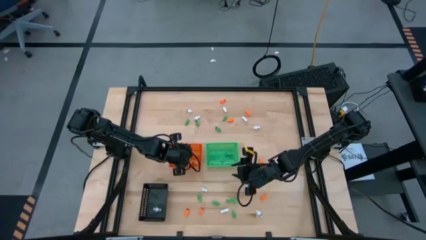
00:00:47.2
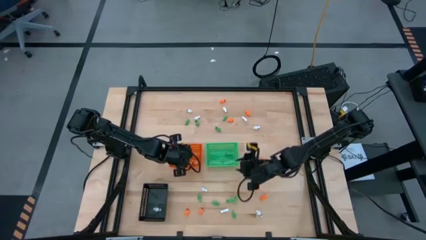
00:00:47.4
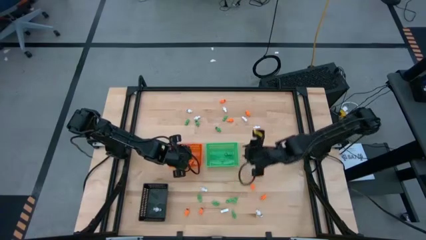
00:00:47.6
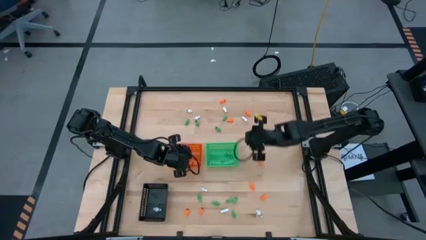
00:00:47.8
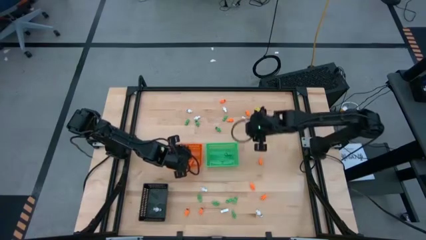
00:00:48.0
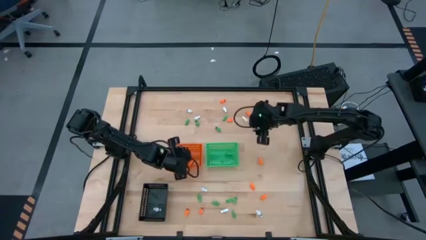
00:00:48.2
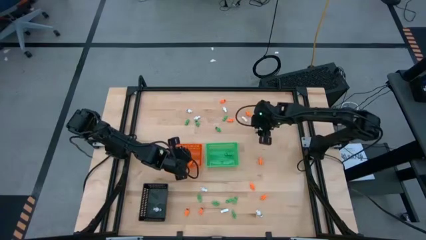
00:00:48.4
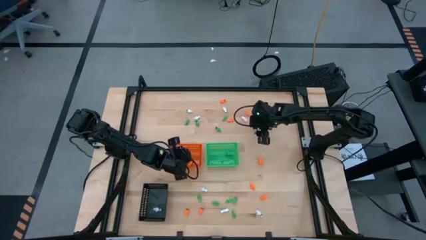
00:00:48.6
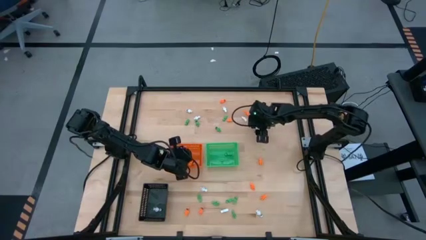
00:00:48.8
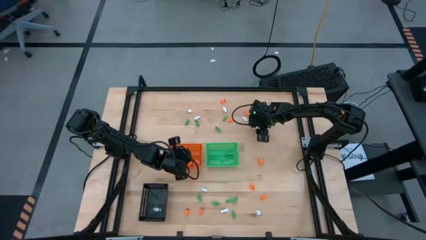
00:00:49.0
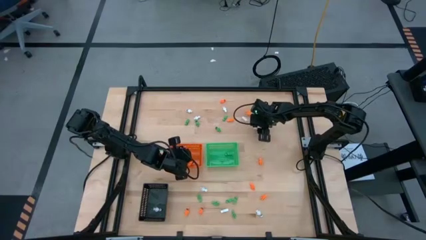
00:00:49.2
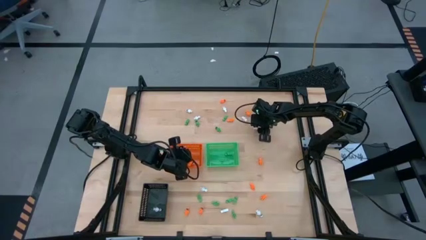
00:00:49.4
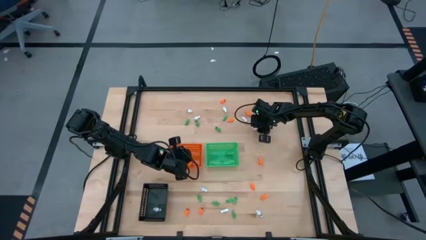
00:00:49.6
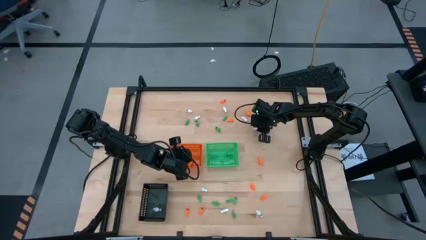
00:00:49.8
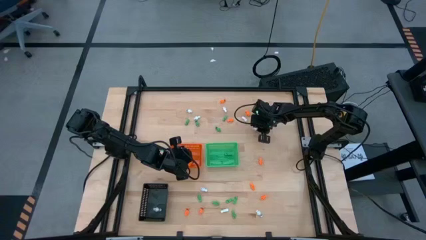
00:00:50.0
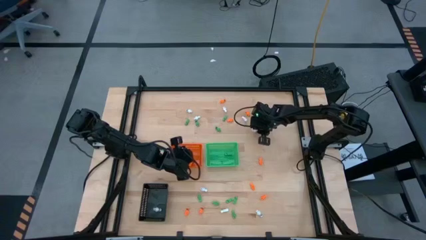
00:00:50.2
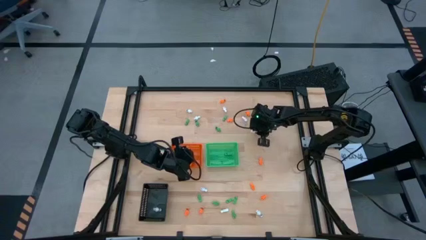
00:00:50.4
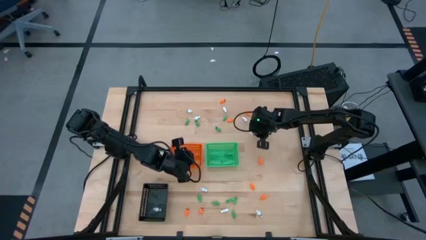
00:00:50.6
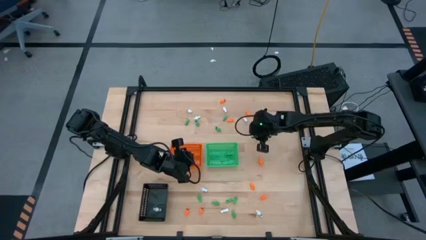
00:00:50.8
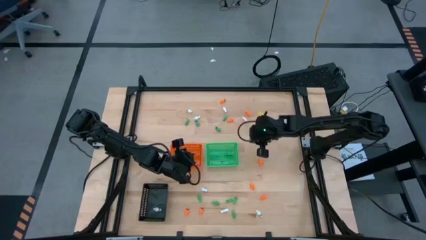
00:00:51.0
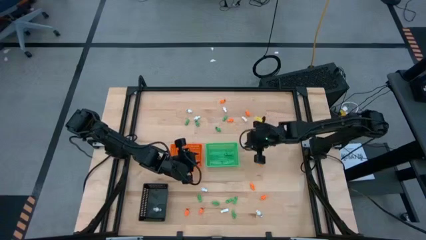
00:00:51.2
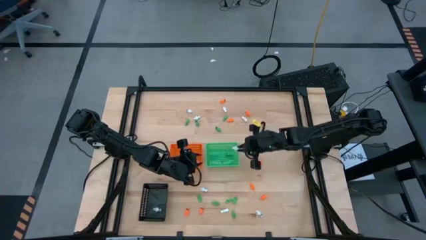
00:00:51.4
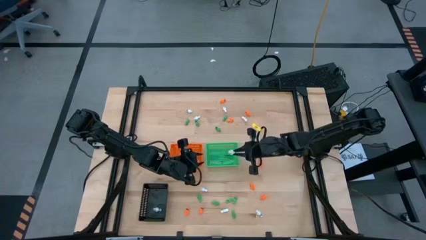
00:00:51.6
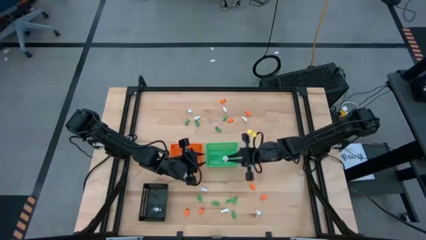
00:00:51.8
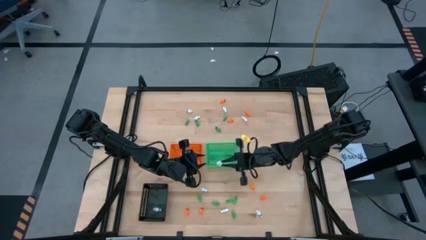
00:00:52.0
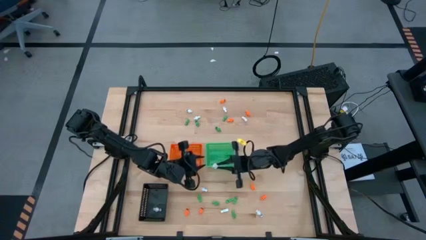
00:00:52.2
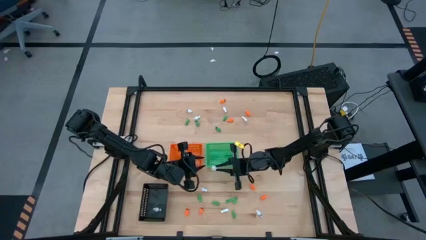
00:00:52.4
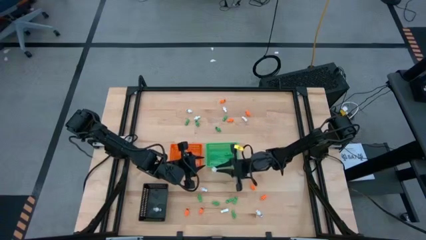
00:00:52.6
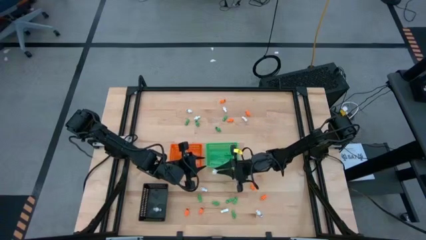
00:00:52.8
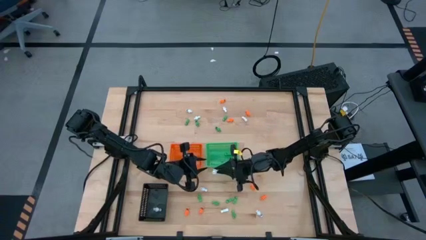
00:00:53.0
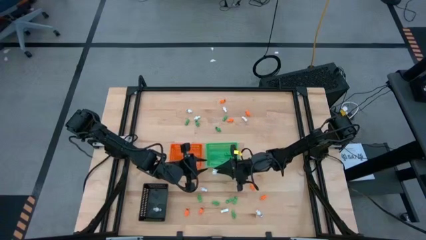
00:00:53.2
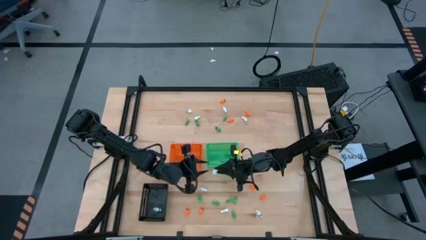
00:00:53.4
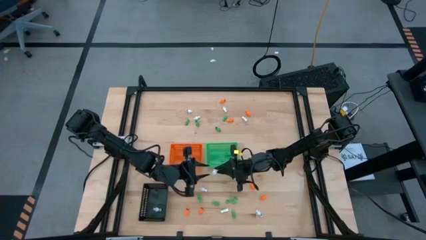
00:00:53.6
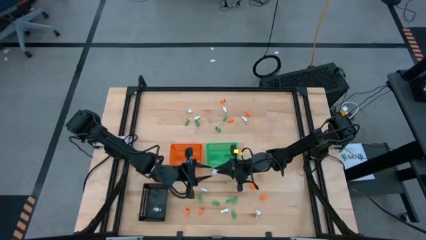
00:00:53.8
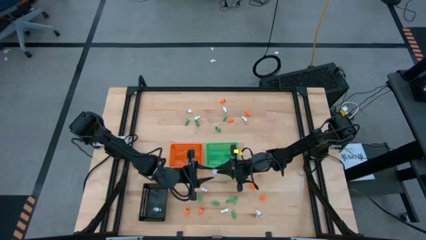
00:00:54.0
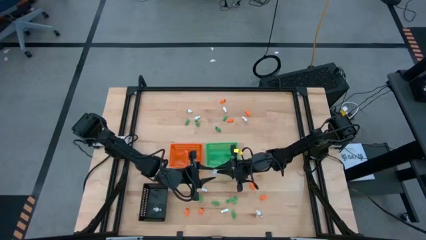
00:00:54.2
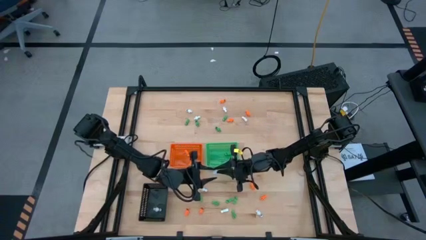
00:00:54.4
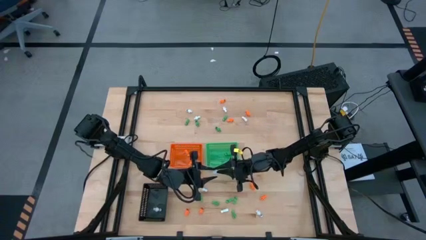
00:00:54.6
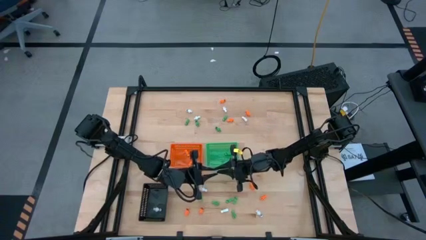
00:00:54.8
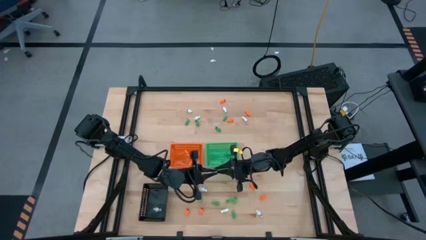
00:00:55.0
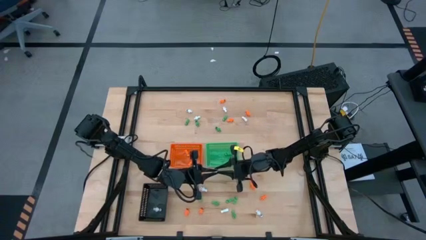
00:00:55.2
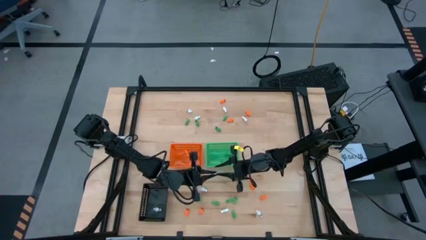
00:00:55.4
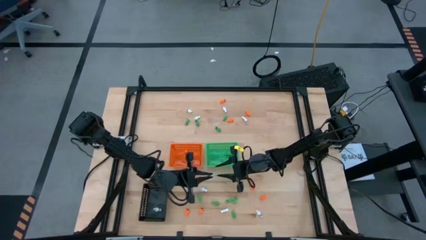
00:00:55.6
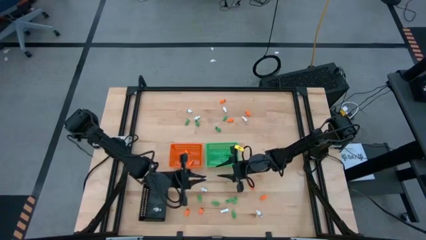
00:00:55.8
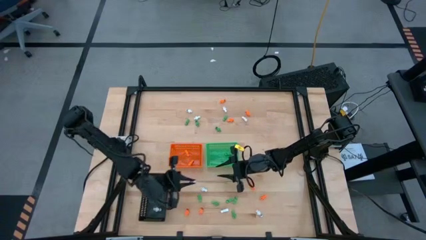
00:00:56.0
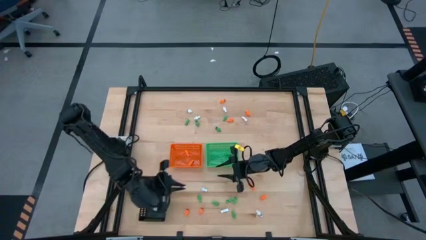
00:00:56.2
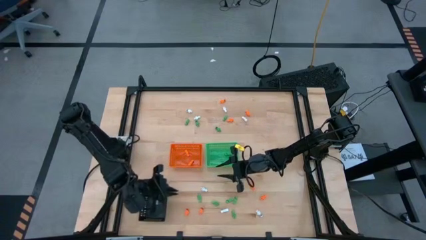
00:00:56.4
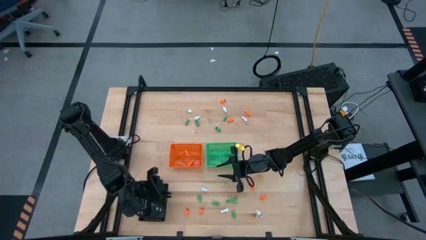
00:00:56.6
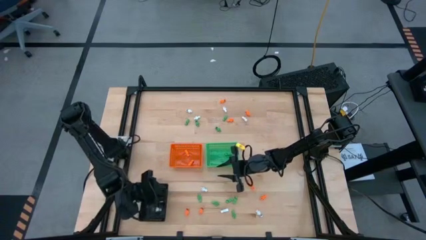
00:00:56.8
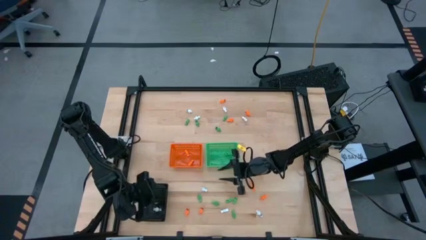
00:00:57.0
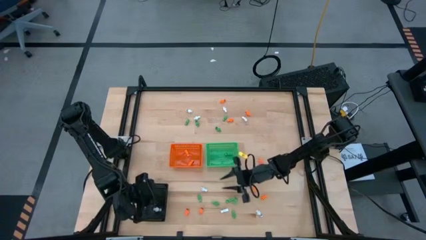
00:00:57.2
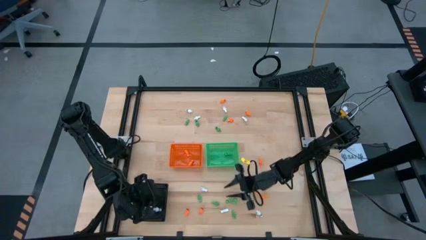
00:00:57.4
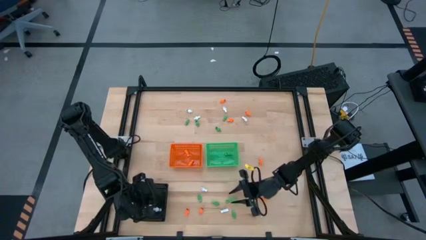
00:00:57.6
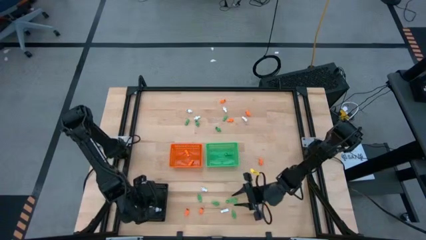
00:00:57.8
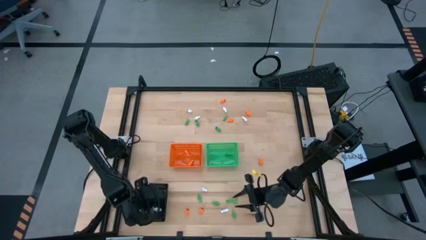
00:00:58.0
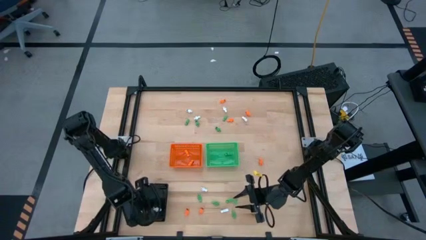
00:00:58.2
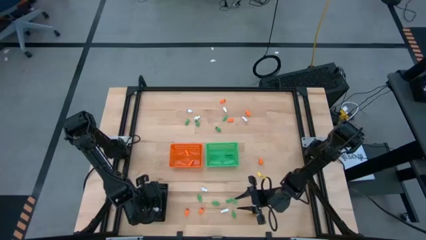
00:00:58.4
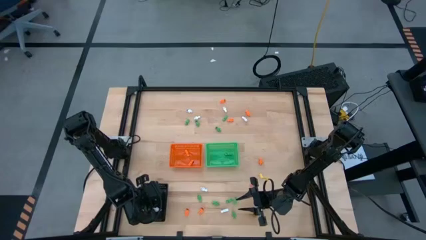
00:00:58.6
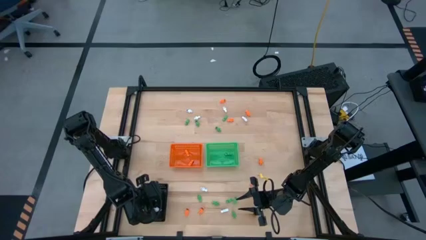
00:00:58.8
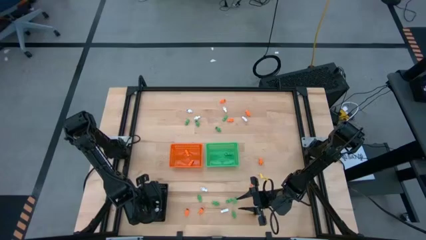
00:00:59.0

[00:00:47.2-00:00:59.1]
Task: Sort Halloween decoration
Put the white skeleton toy into the black bin
